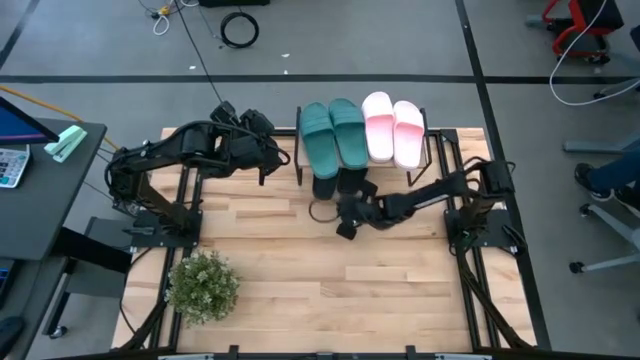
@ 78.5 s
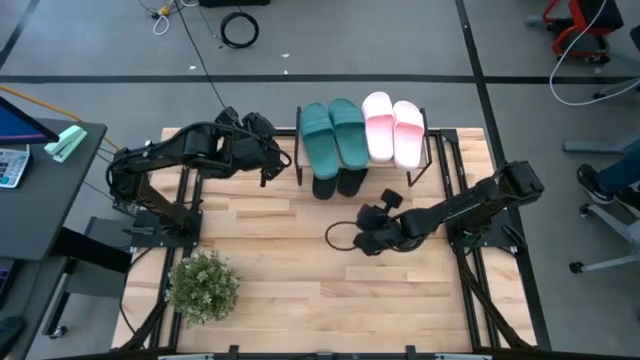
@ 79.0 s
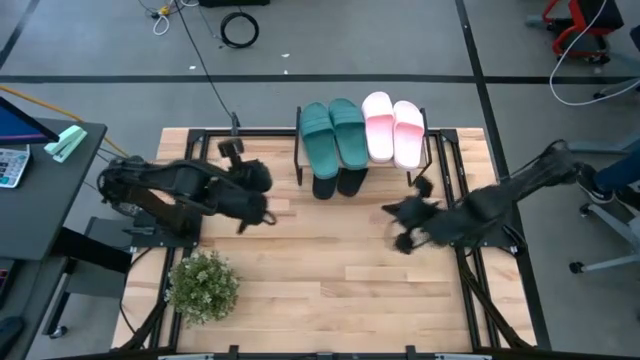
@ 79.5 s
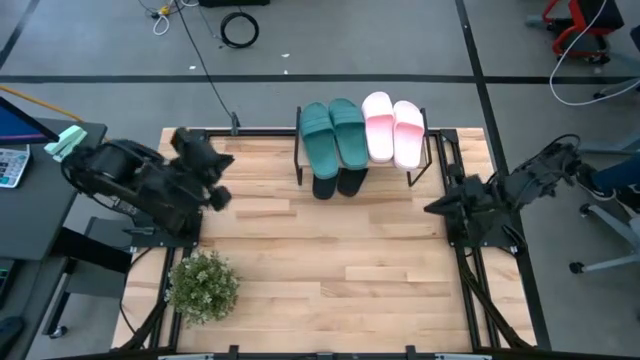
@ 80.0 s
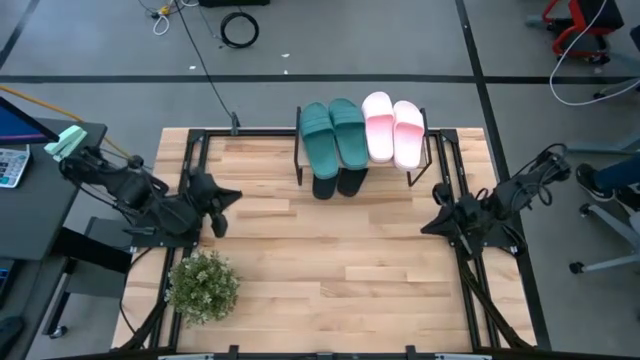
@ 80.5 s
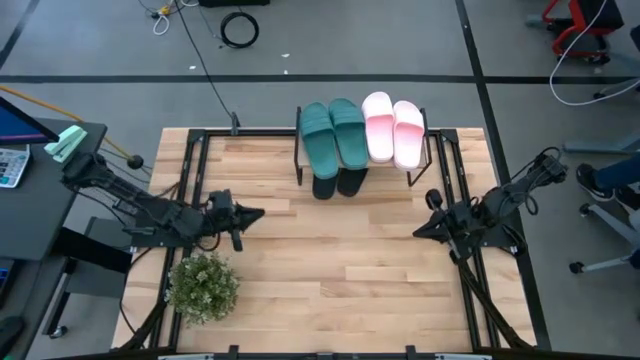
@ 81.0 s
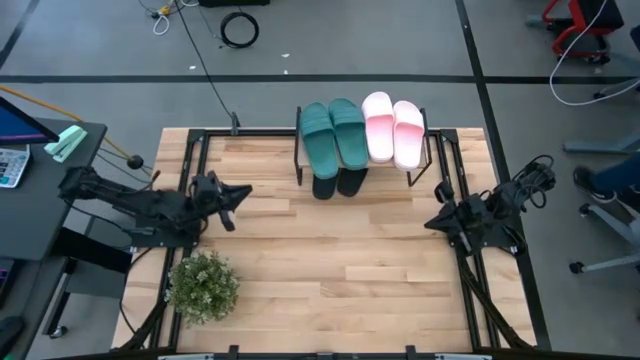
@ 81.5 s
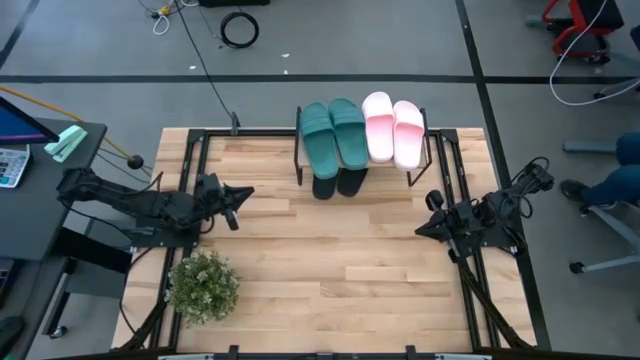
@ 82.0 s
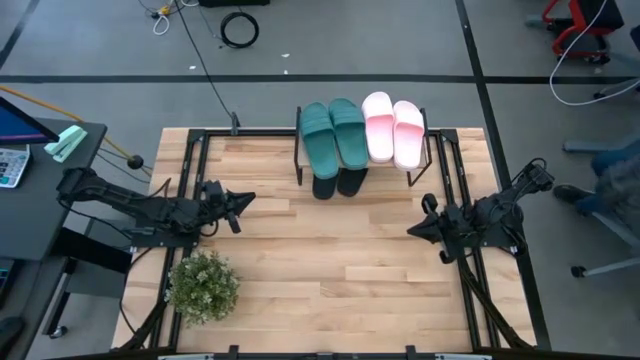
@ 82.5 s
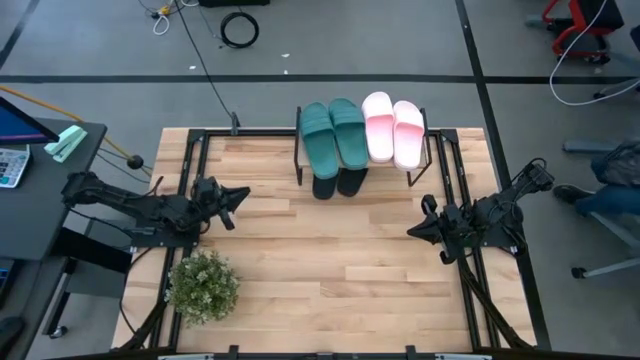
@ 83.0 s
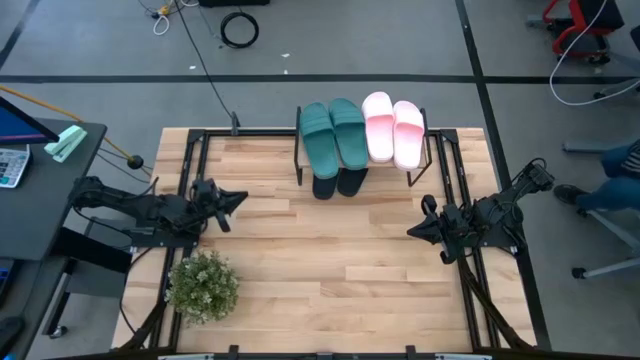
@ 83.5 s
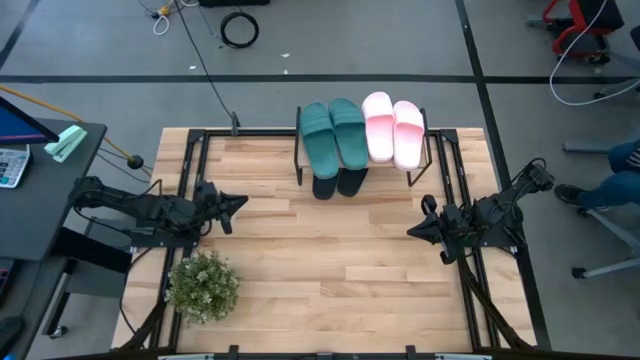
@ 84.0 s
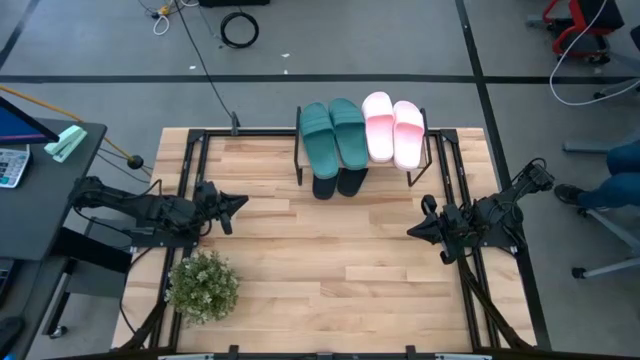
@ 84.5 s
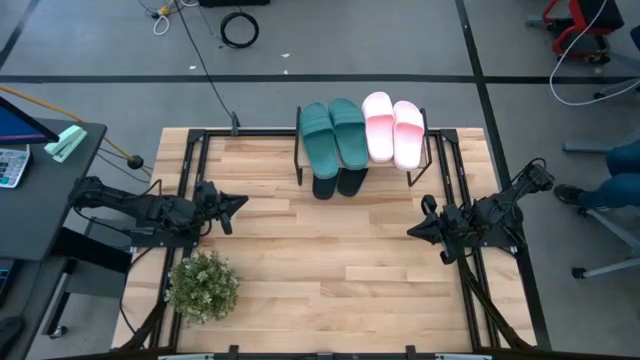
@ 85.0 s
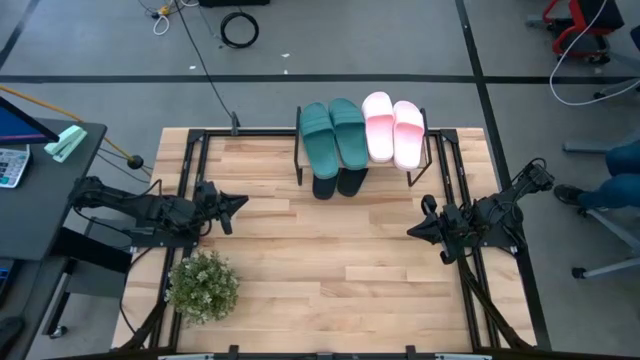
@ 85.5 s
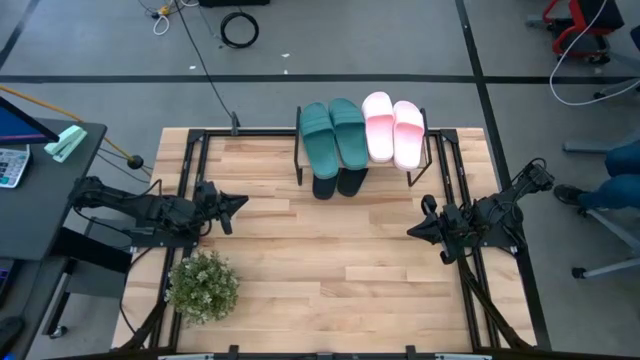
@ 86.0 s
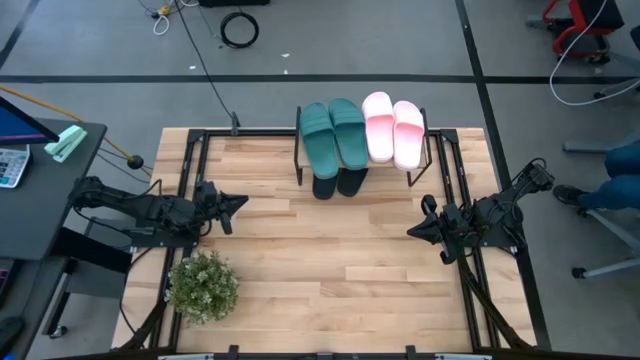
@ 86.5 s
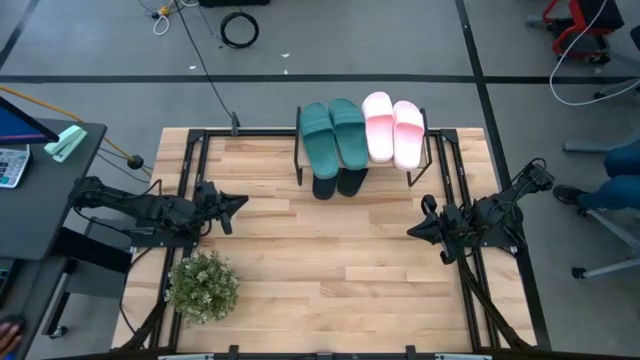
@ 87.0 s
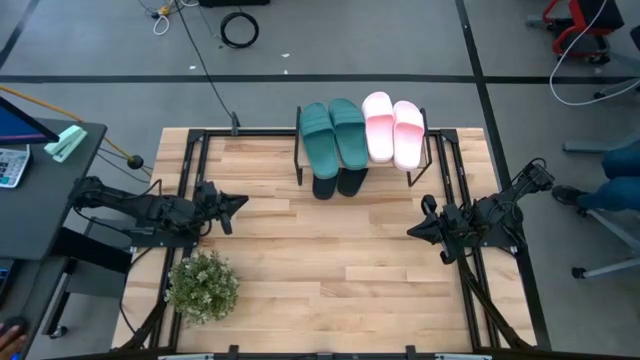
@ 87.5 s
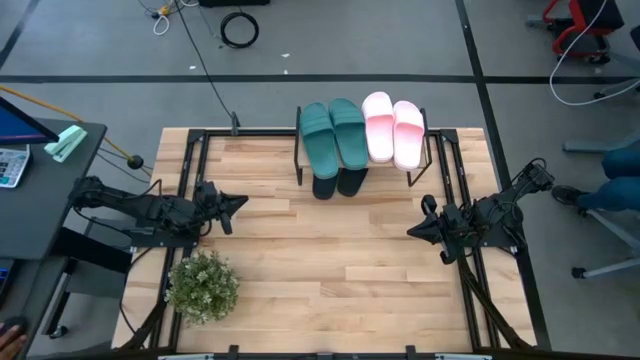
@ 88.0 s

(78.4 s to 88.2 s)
Task: Pick and place slides into the shelf
Return to Home Position

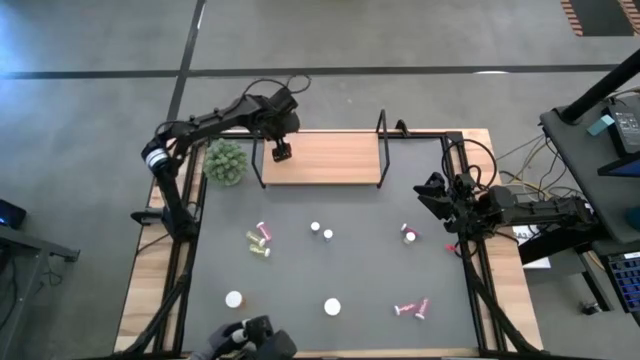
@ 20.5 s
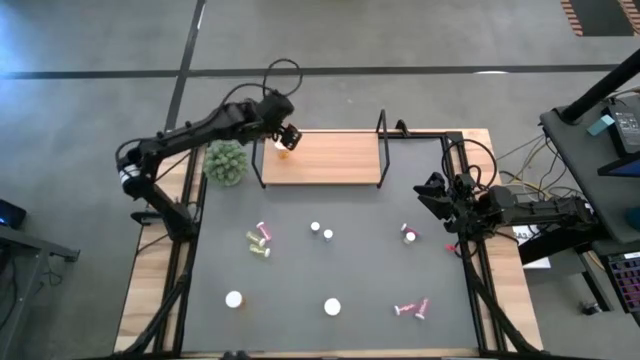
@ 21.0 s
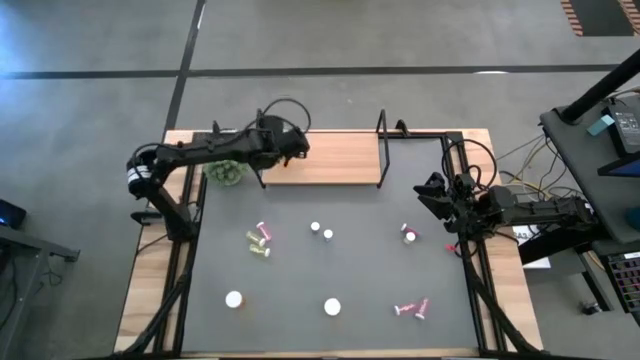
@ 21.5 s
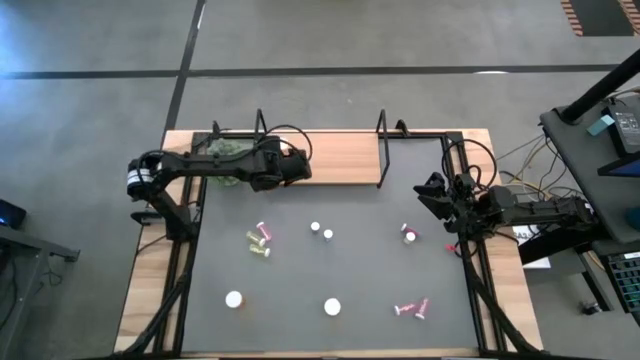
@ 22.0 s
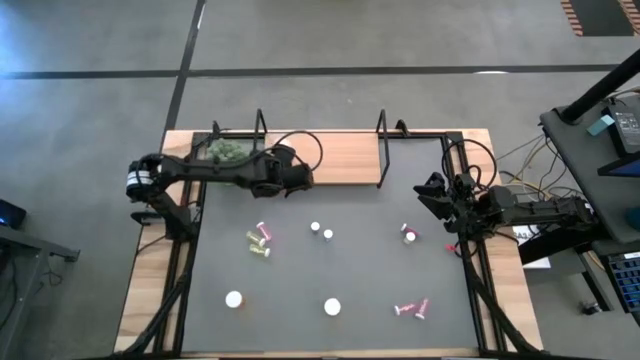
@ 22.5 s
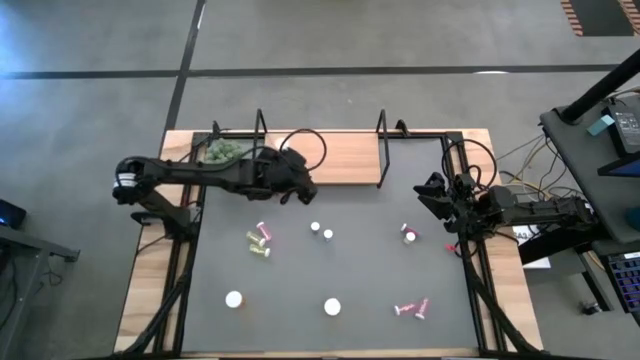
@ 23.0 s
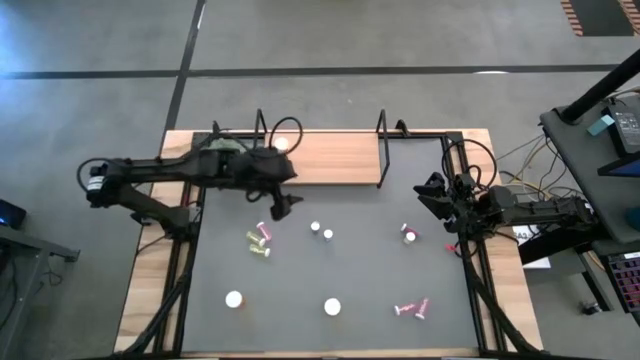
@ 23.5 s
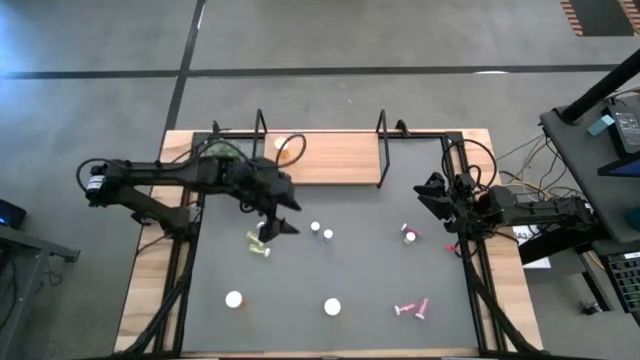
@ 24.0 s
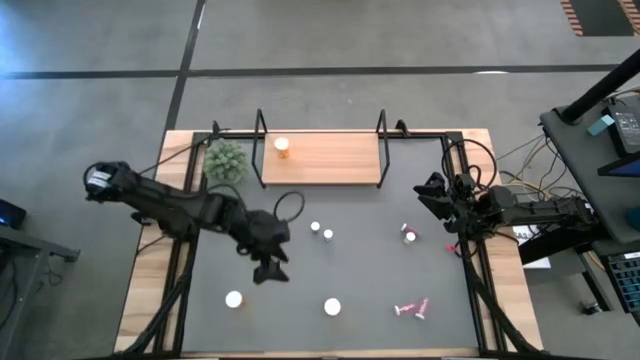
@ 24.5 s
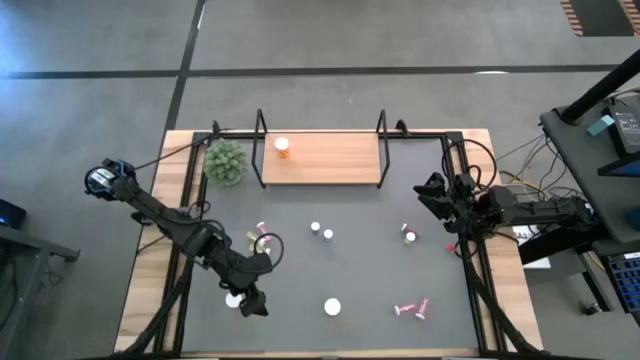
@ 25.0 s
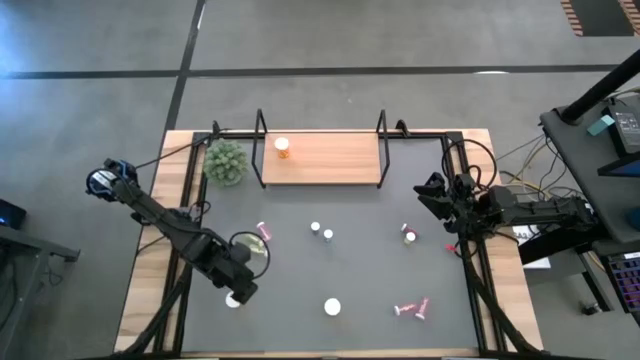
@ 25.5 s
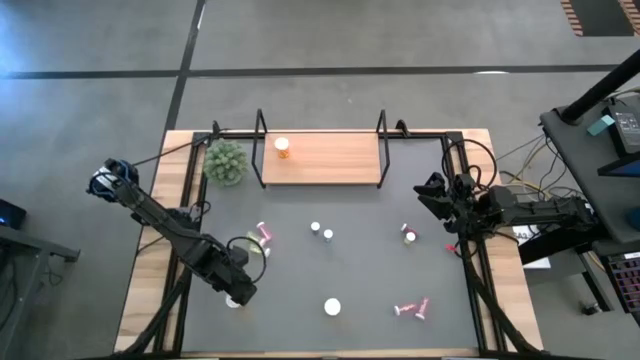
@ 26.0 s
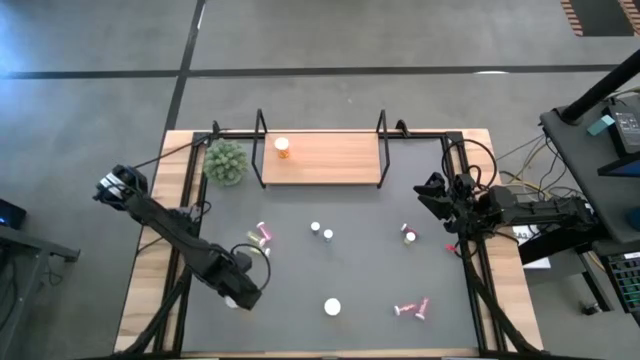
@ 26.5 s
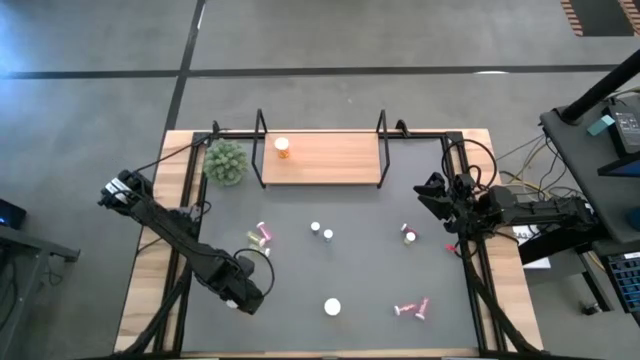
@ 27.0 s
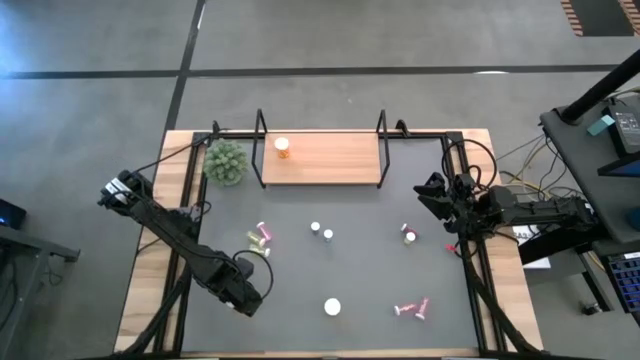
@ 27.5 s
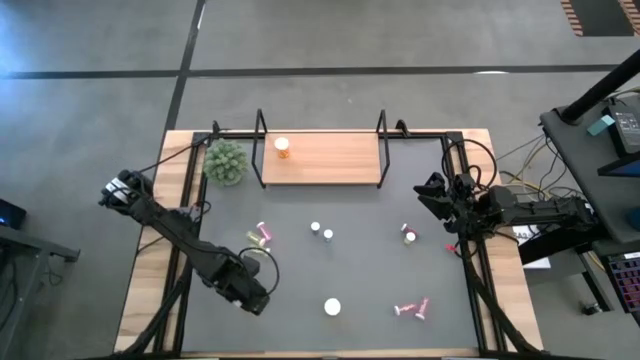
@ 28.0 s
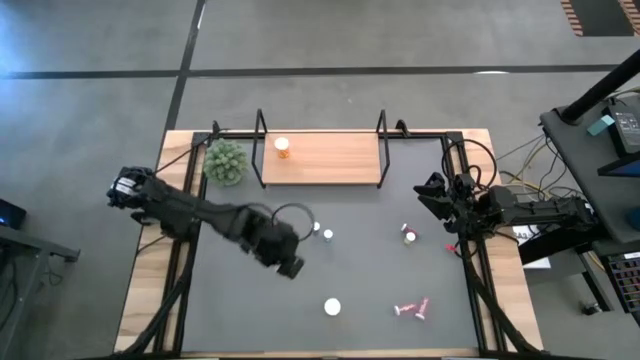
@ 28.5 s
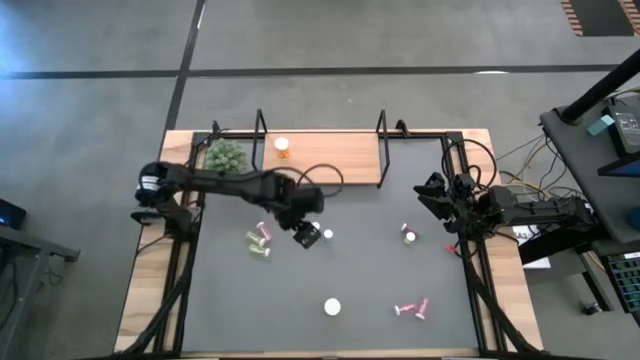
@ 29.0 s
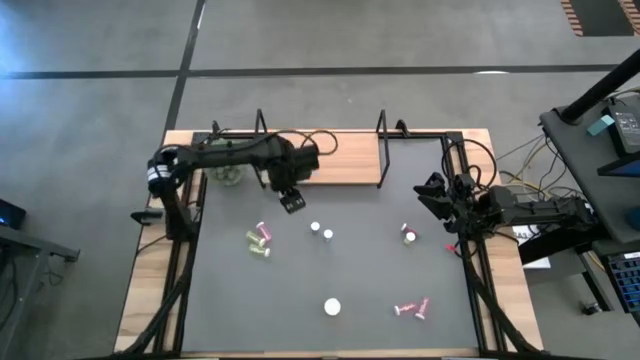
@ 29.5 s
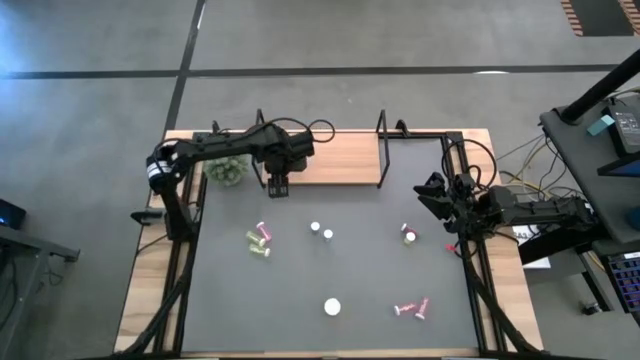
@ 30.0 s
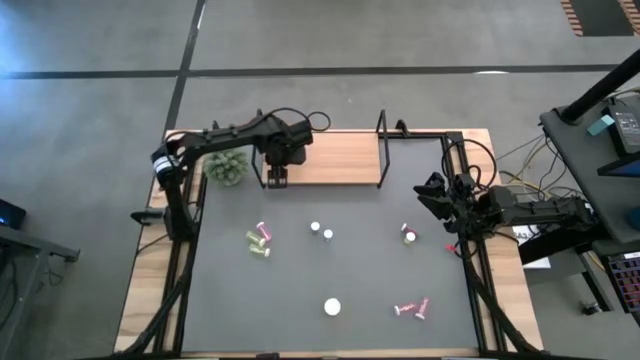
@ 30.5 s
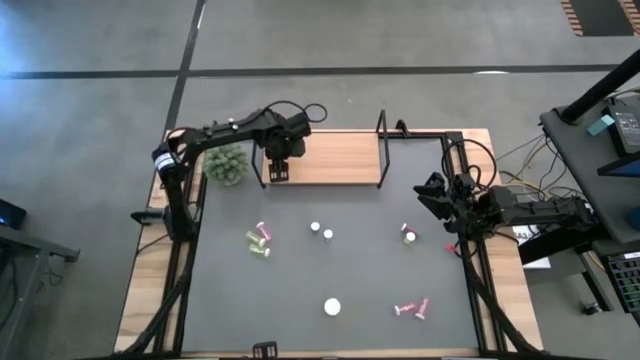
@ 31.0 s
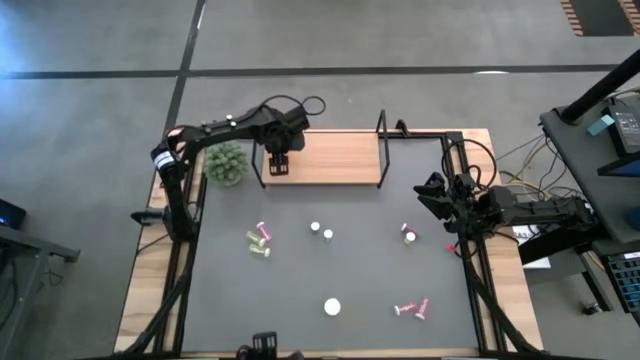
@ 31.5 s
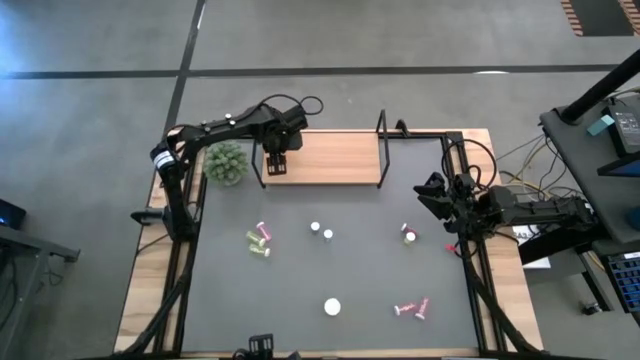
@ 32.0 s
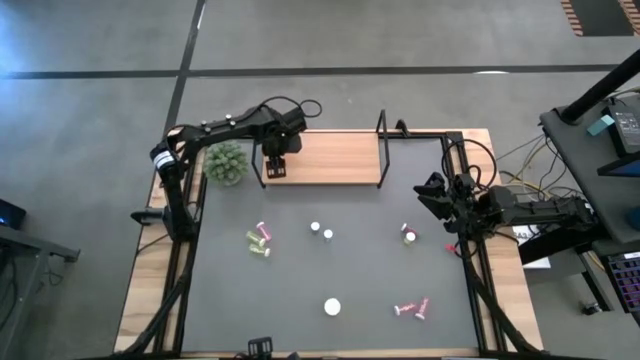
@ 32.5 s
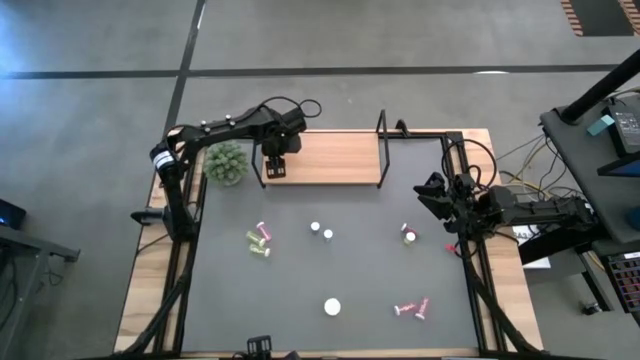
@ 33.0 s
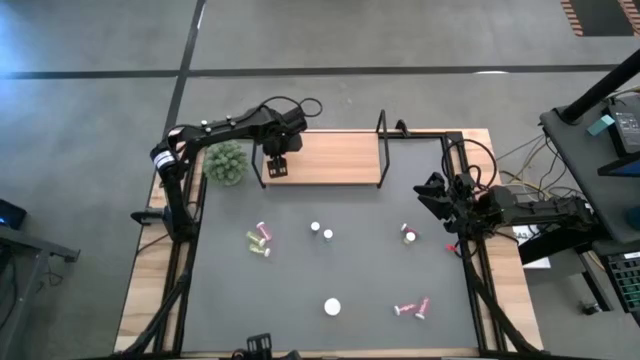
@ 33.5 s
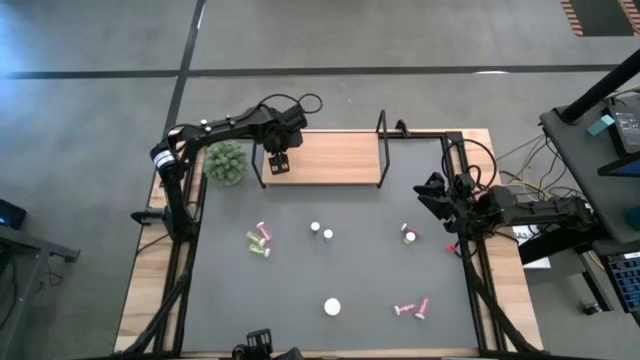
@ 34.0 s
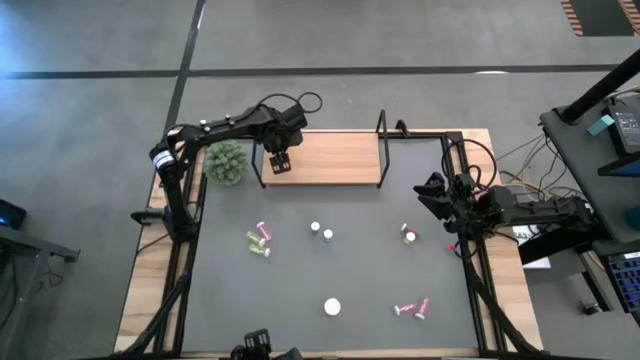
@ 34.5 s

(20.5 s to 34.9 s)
Task: Pick and place medicine bottles onto shelf by color
Put the left orange pill bottle on the shelf aligned with the other orange pill bottle
